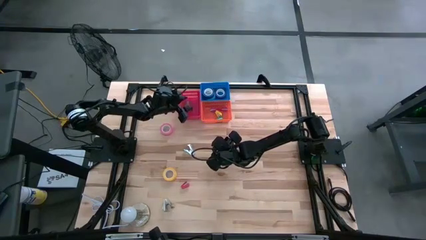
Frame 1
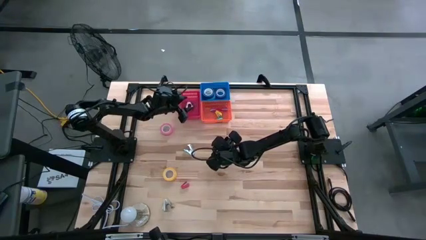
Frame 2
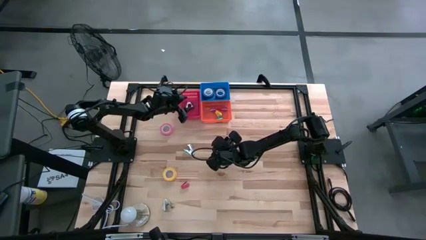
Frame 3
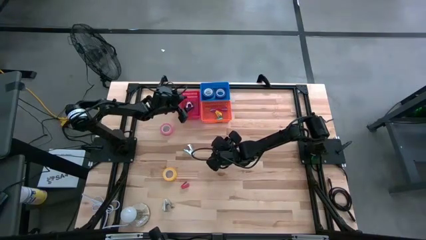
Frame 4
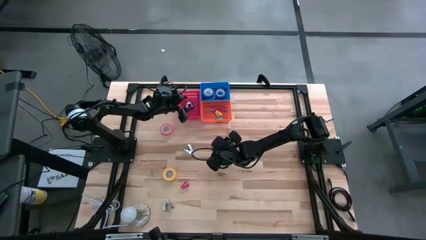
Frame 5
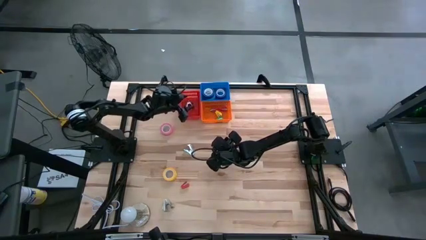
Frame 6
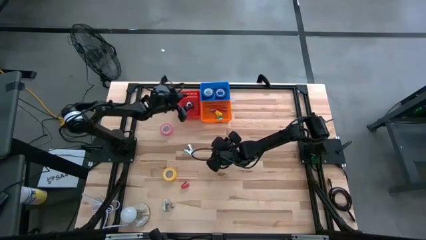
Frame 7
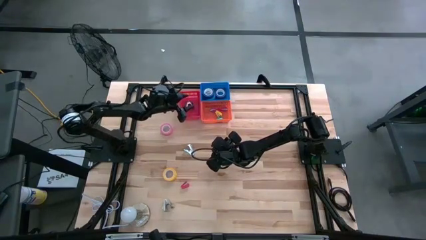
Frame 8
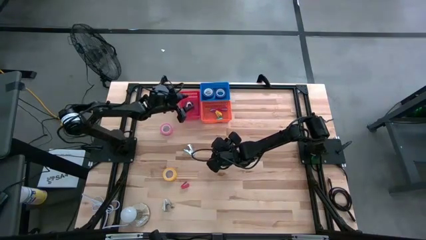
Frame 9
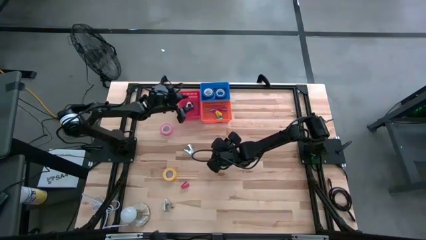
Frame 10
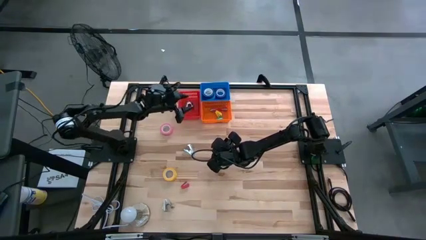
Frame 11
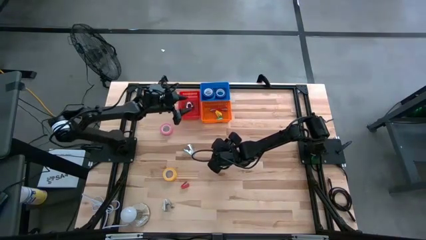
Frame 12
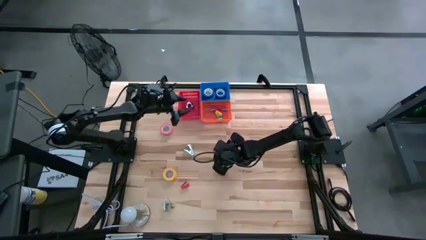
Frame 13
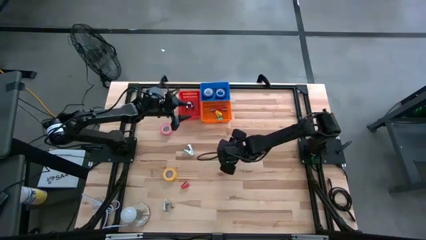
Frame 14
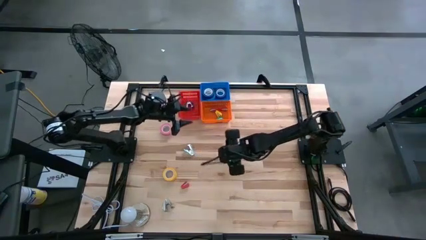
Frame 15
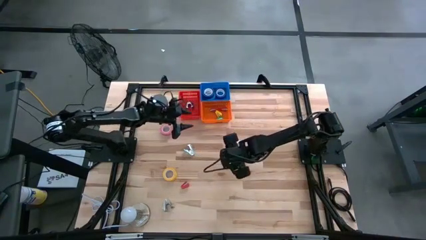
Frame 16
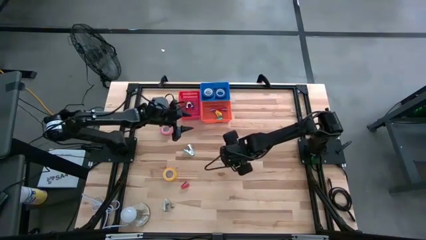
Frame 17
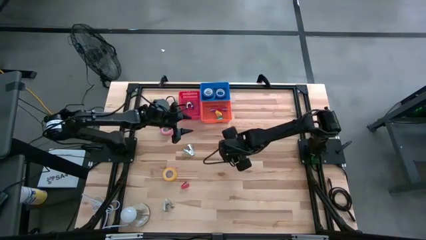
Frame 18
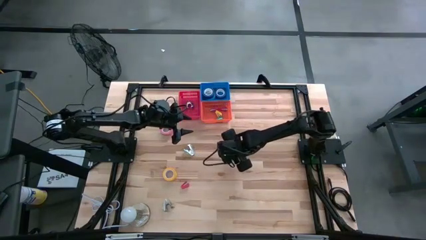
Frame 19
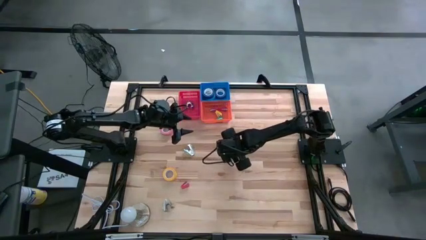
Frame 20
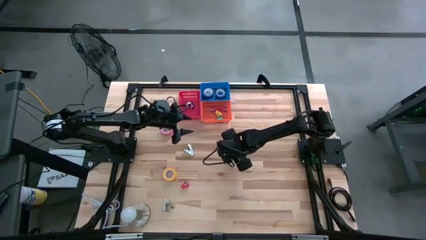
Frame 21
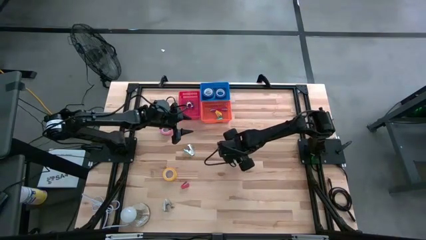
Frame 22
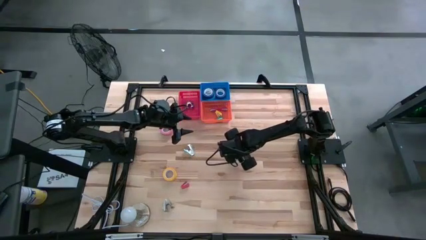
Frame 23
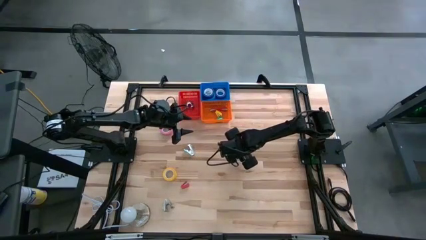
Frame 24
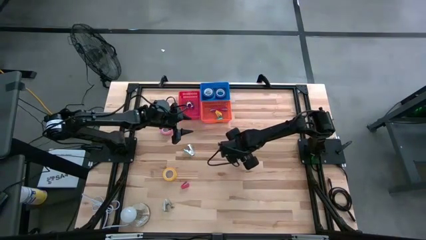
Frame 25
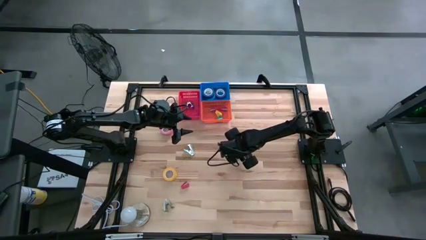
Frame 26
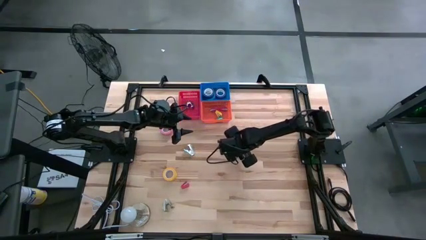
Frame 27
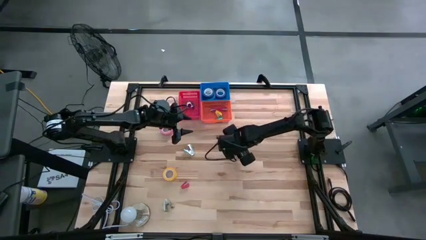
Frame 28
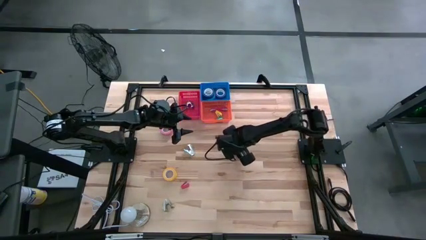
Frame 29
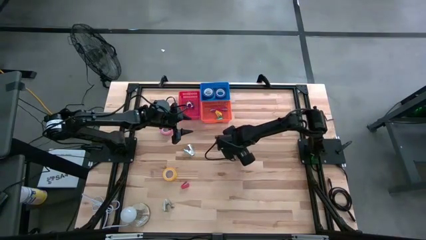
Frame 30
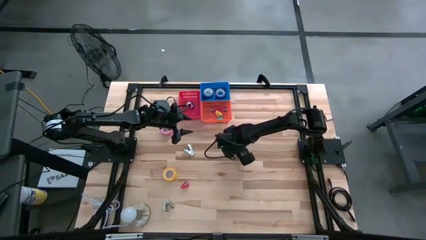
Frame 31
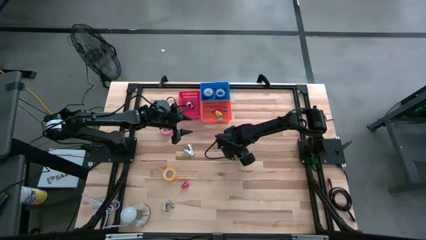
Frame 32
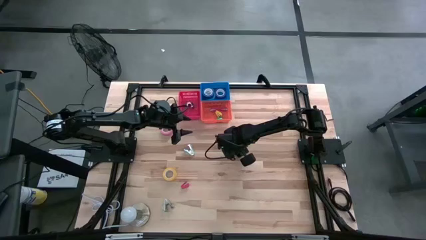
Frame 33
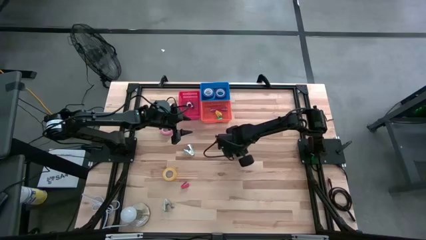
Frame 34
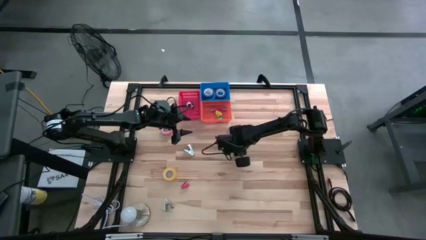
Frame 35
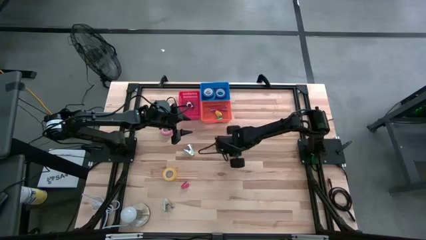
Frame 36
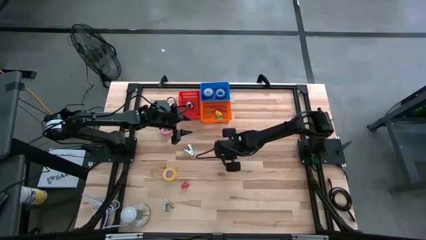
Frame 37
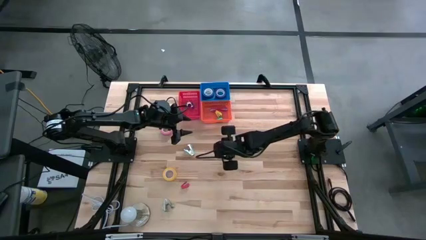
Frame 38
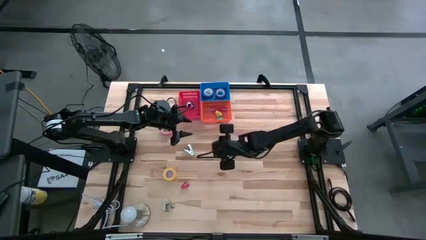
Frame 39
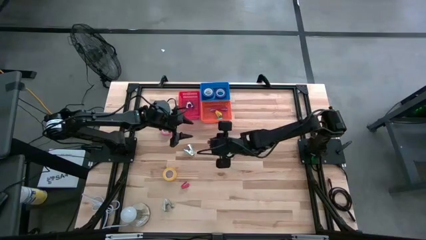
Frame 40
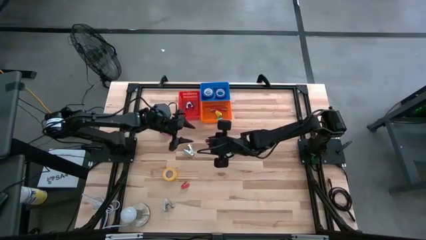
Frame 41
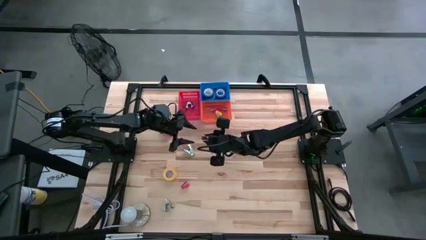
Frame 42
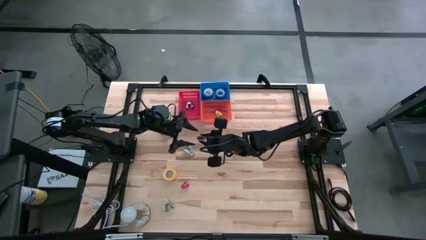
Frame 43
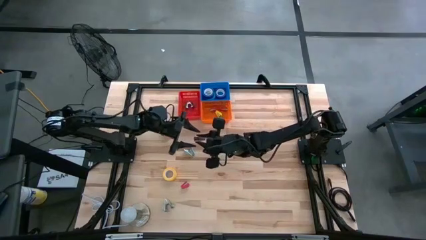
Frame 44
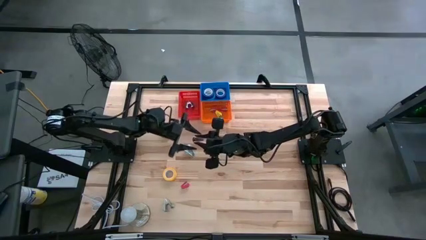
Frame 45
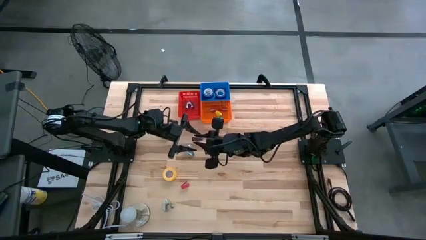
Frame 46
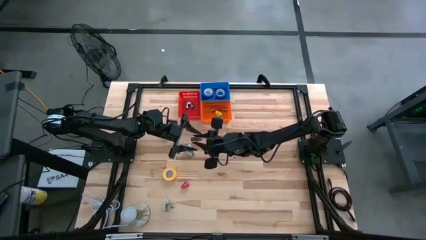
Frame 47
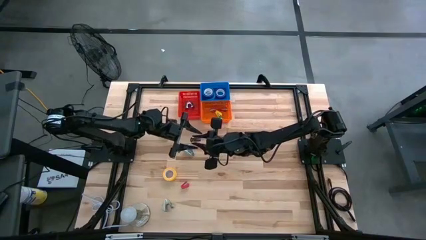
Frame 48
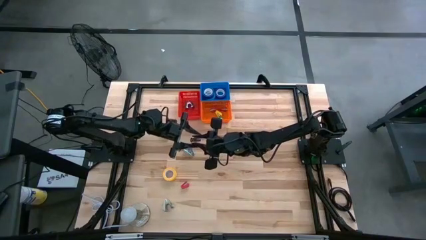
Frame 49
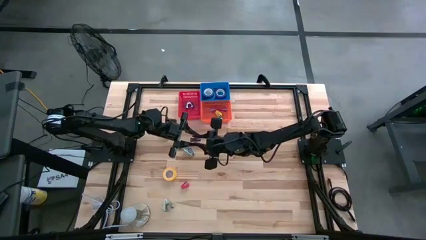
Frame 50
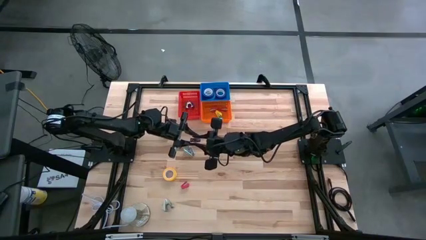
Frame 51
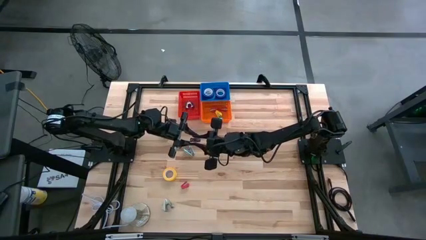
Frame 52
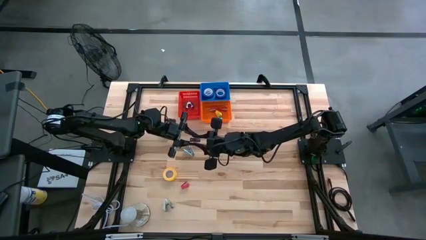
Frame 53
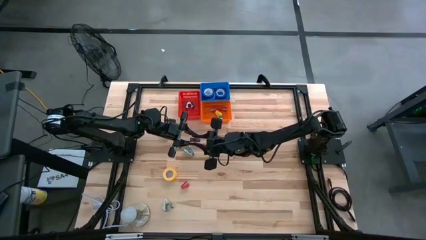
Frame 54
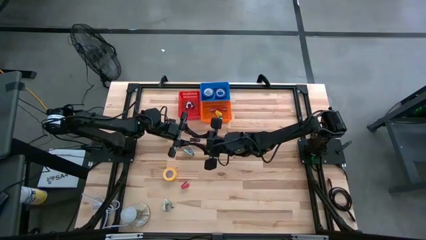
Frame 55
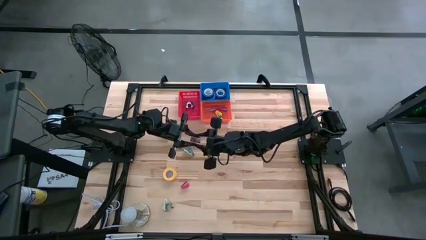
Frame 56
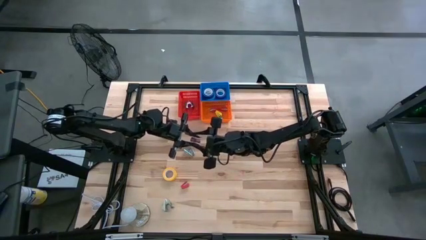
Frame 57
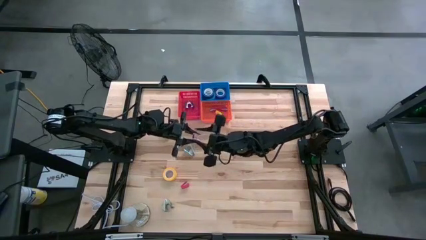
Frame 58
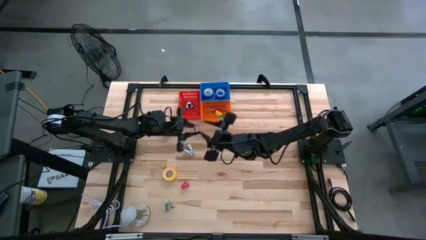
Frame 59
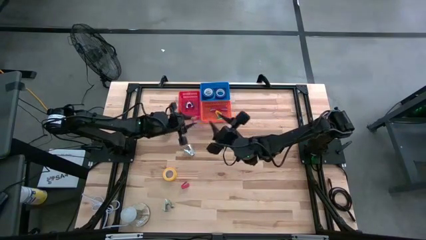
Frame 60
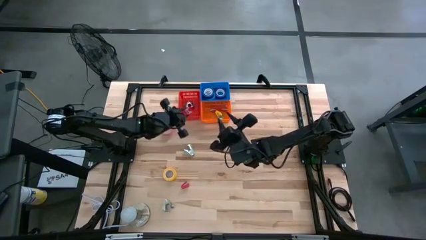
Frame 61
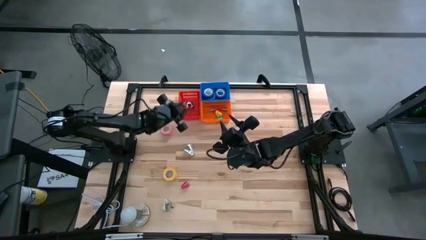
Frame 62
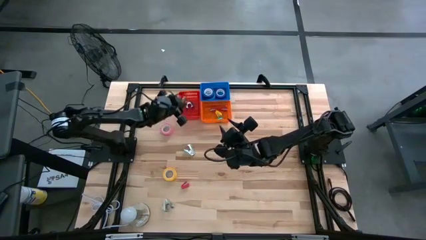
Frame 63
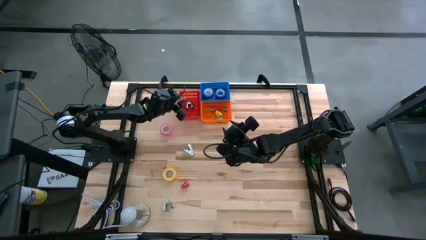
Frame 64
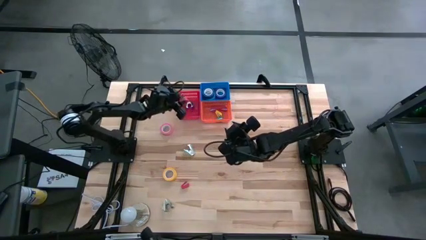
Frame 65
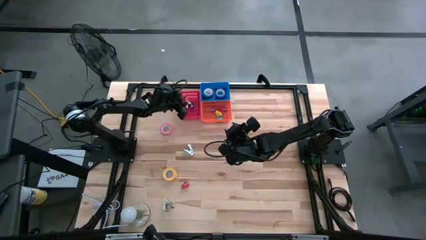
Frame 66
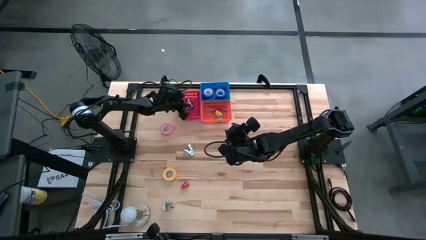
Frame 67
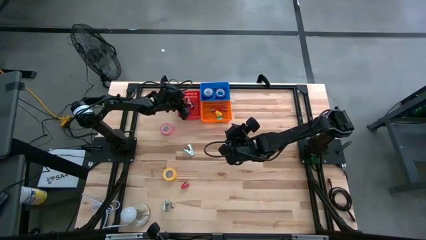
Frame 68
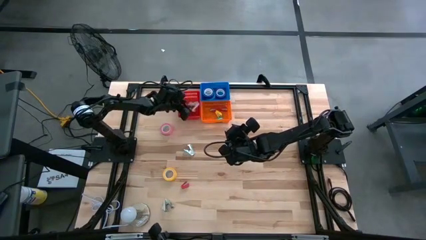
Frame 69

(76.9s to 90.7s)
Task: Pick and place Stapler, Stapler remover, tape
Put the pink staple remover into the red bin

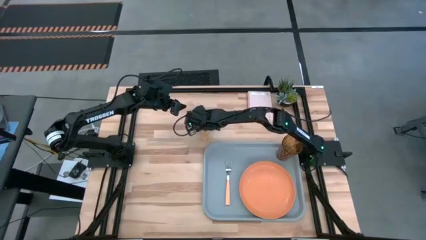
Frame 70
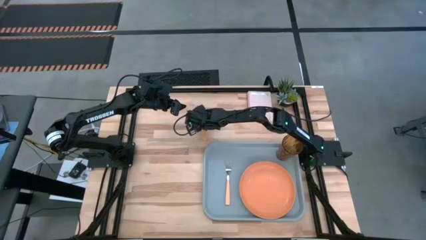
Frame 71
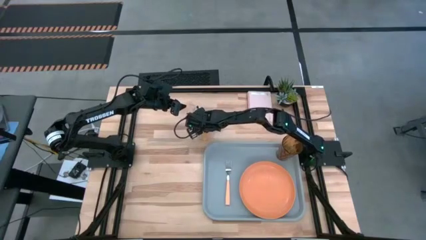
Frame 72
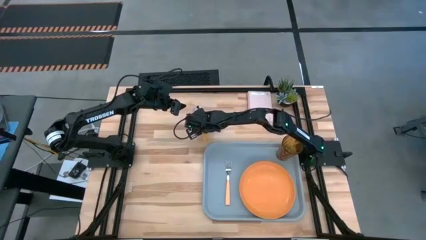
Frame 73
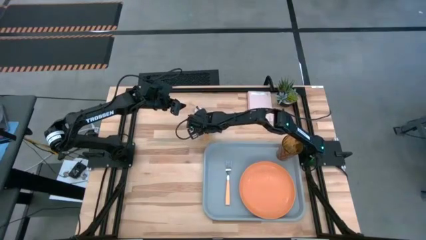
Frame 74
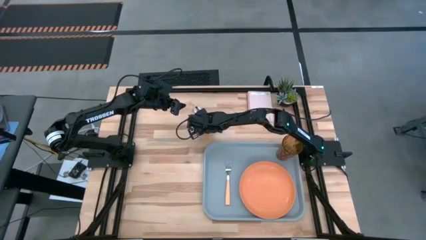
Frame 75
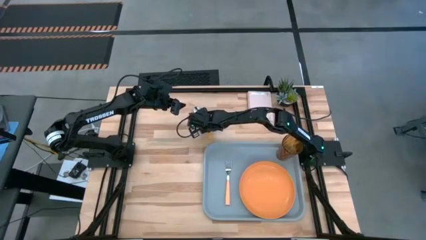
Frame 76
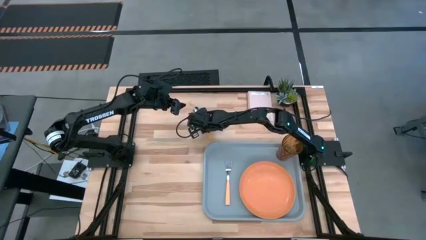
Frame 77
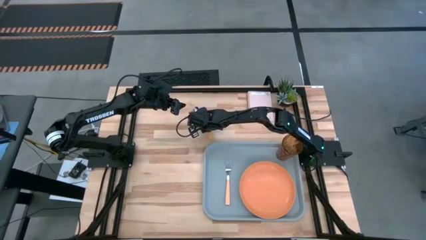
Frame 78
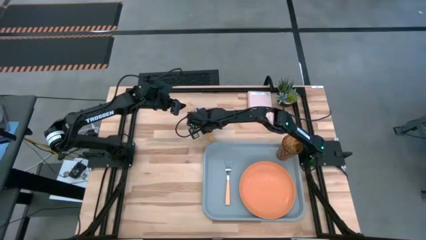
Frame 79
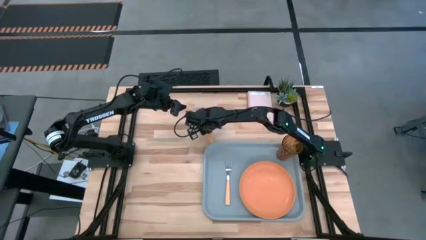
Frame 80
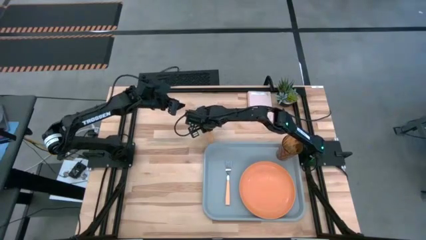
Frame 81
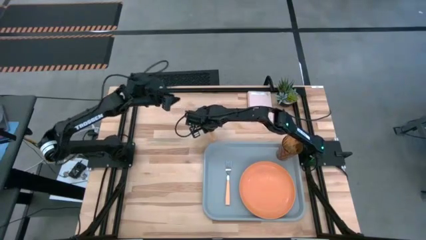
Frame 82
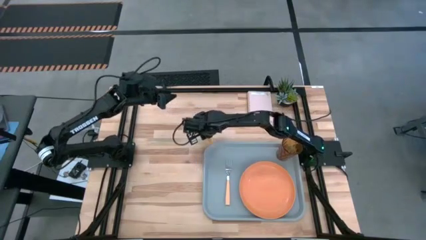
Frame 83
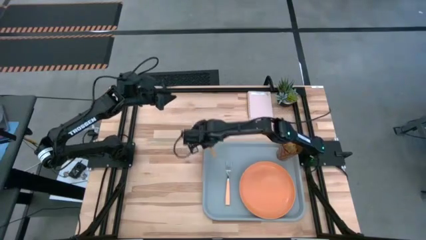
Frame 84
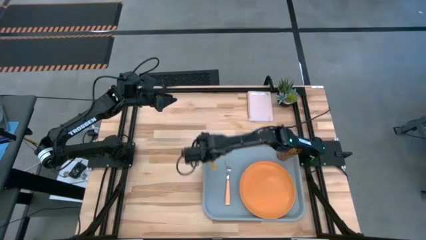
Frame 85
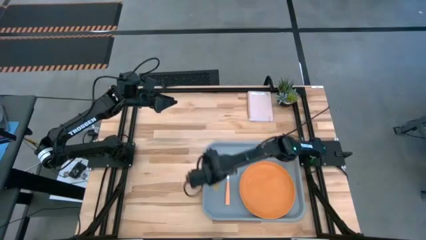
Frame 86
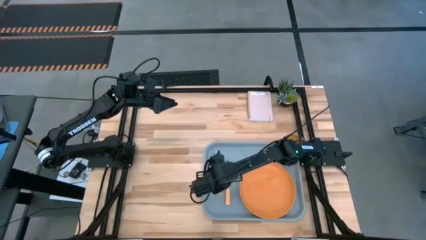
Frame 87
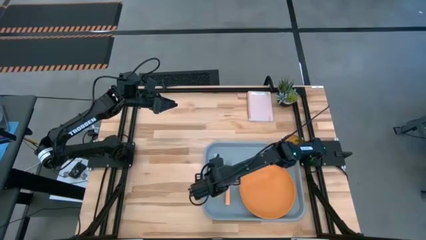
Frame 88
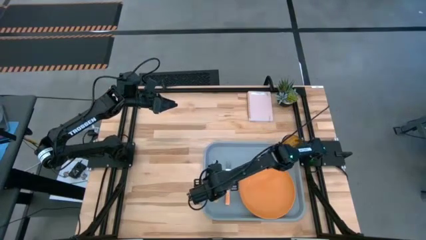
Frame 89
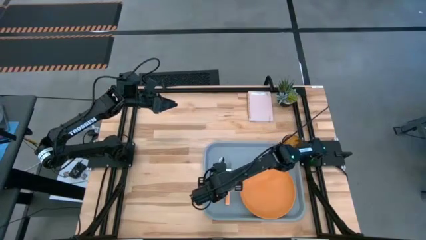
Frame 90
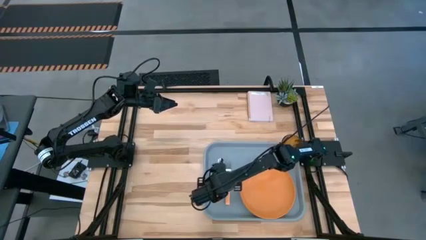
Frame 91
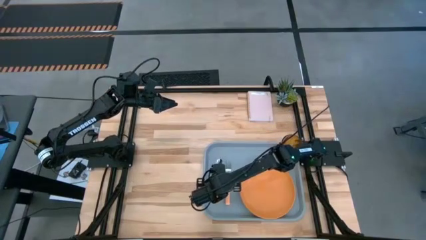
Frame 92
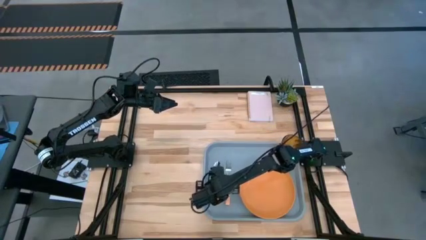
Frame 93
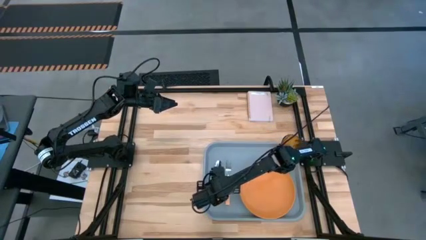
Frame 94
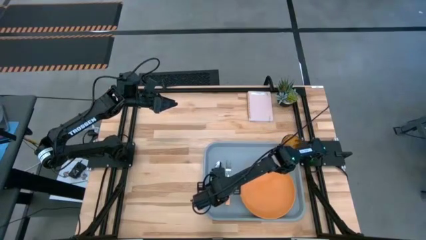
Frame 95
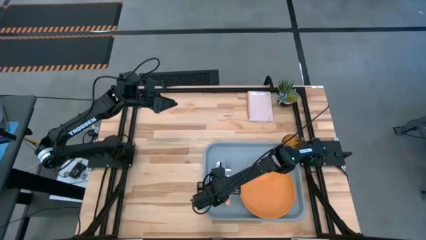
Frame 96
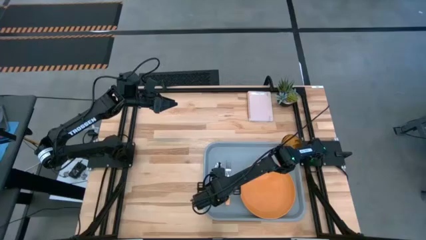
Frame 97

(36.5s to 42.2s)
Task: Pick and place plate/cup/fork/spoon on tray
Put the orange spoon on the gray serving tray, beside the orange fork
